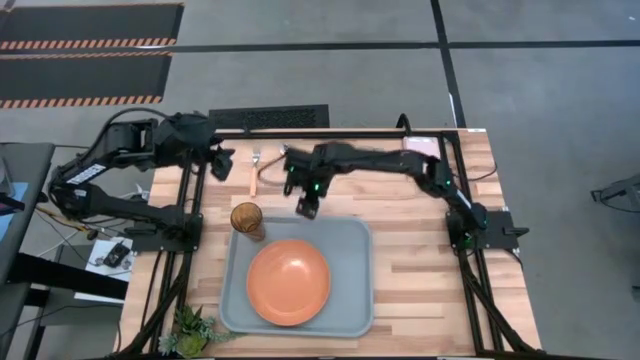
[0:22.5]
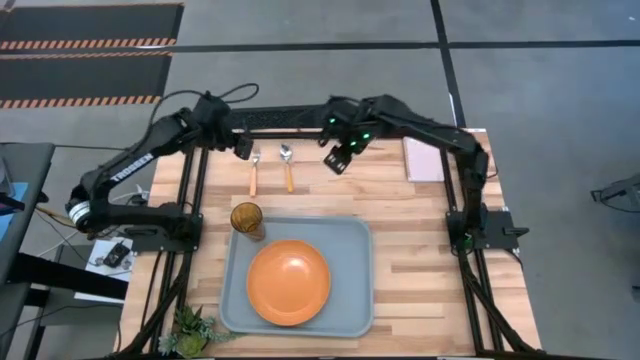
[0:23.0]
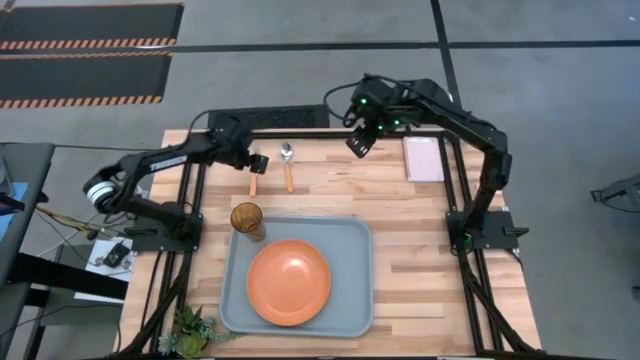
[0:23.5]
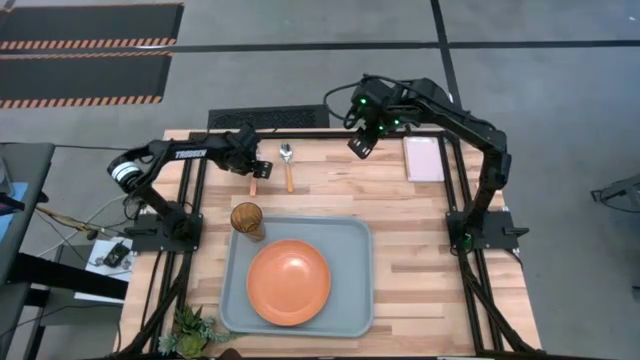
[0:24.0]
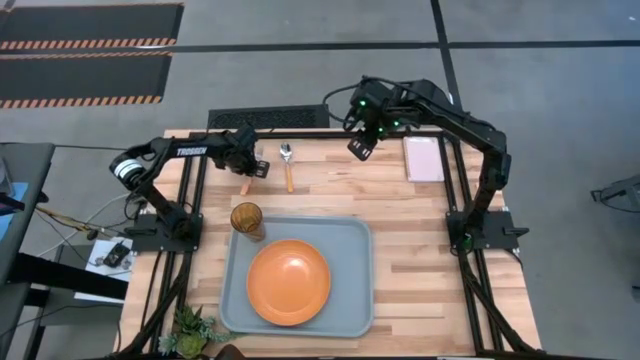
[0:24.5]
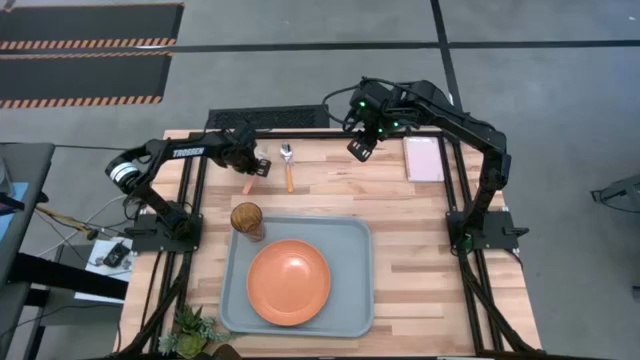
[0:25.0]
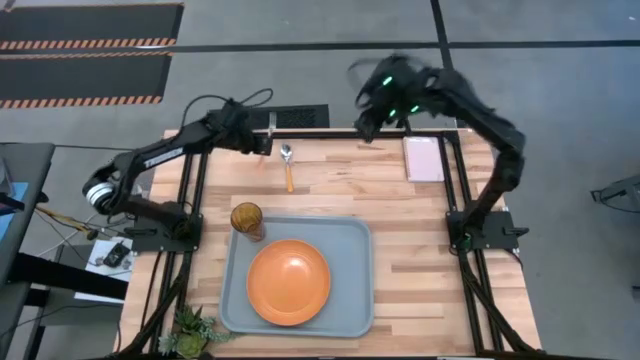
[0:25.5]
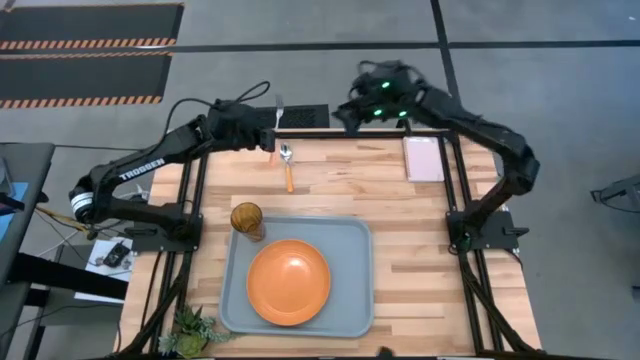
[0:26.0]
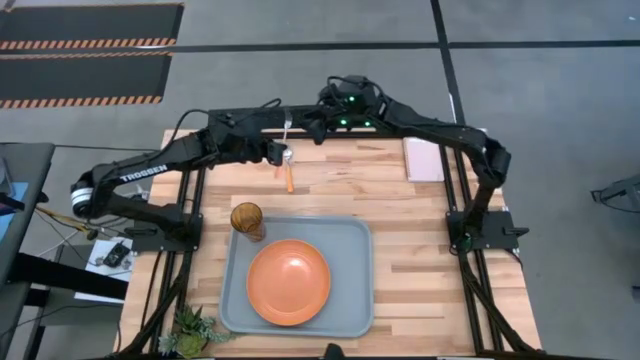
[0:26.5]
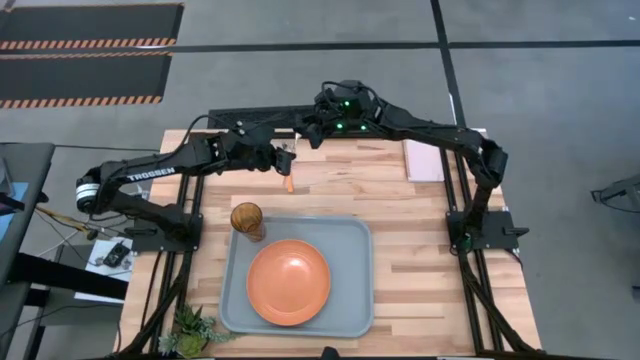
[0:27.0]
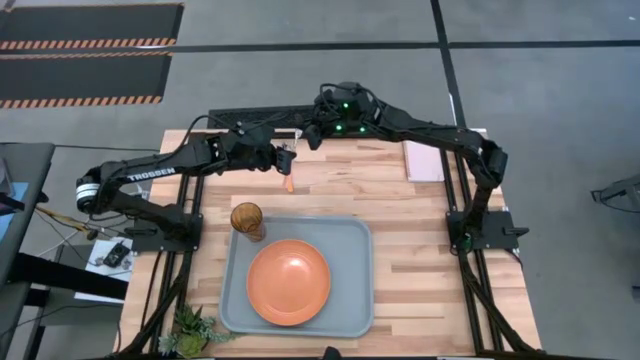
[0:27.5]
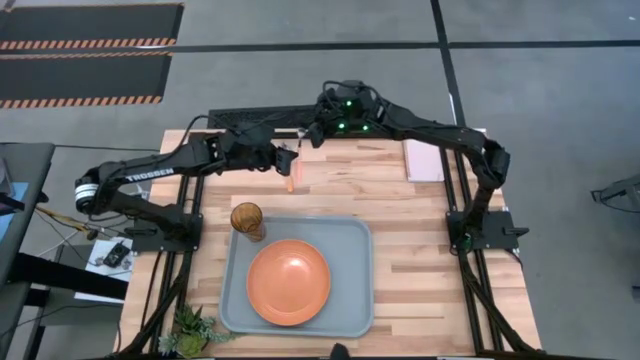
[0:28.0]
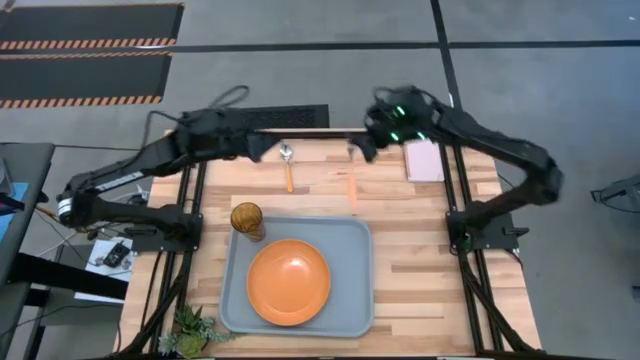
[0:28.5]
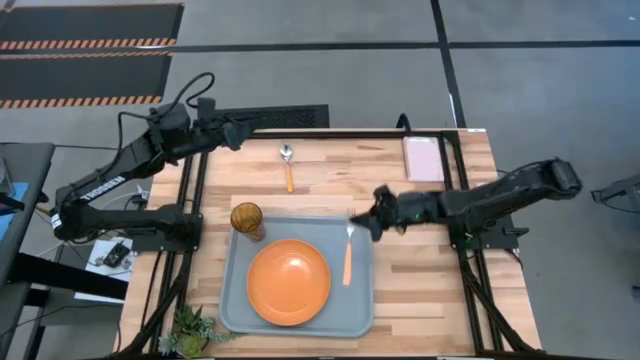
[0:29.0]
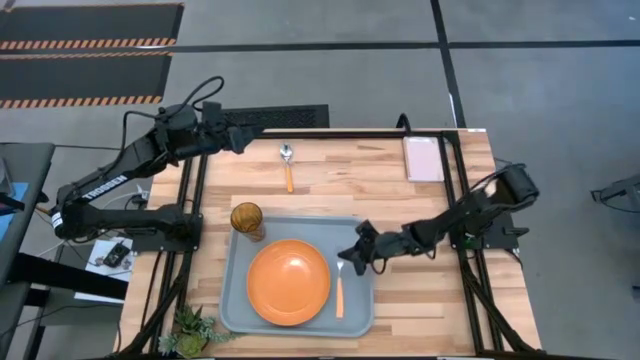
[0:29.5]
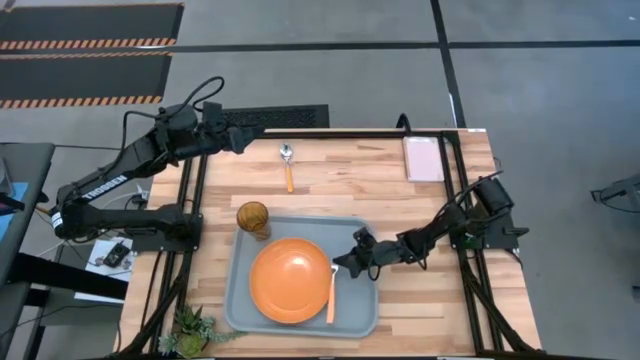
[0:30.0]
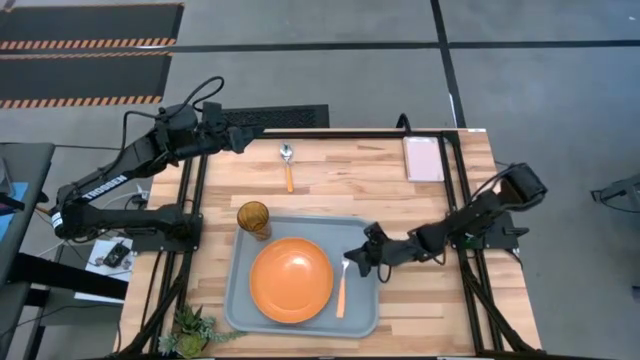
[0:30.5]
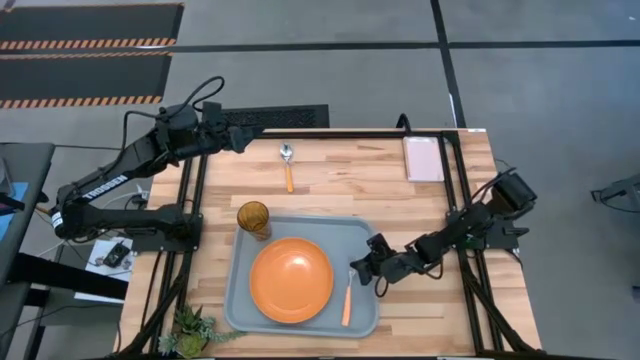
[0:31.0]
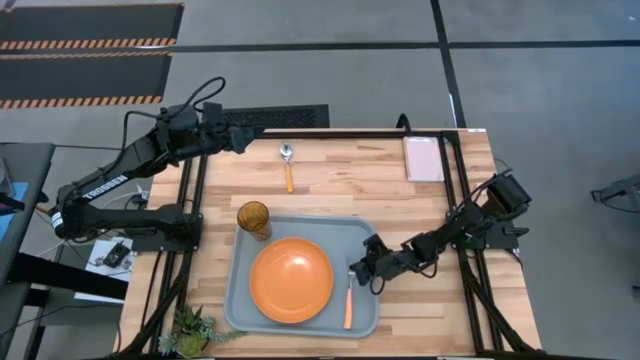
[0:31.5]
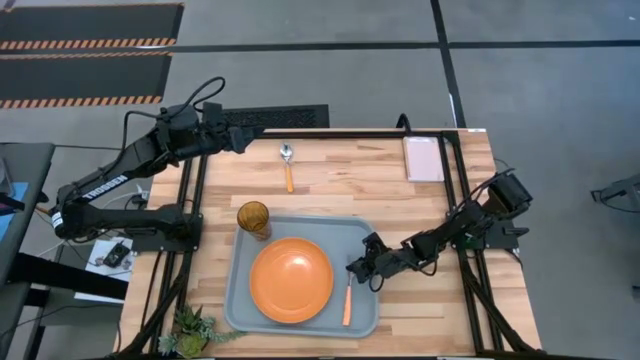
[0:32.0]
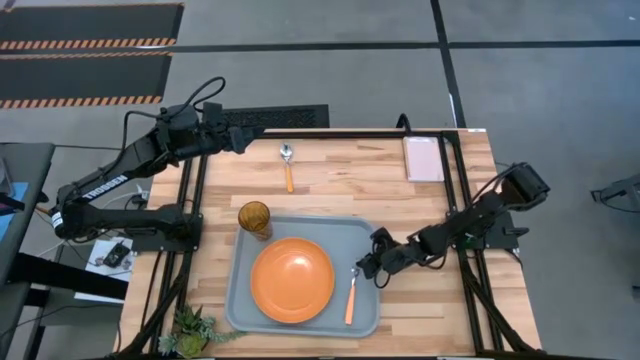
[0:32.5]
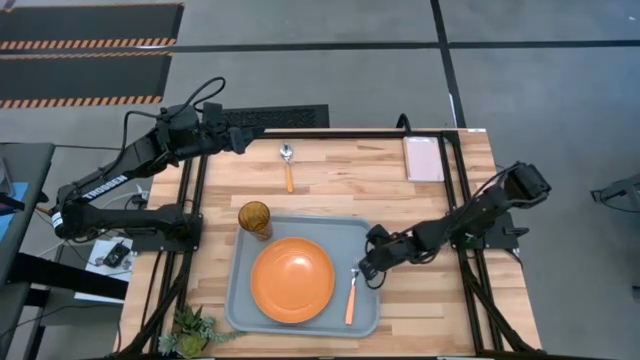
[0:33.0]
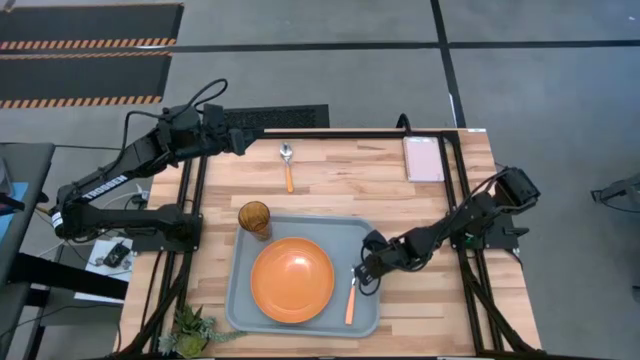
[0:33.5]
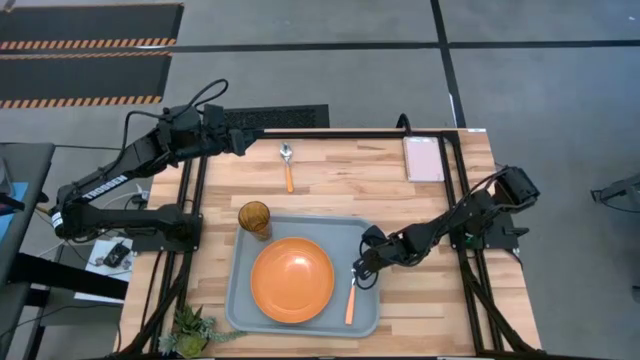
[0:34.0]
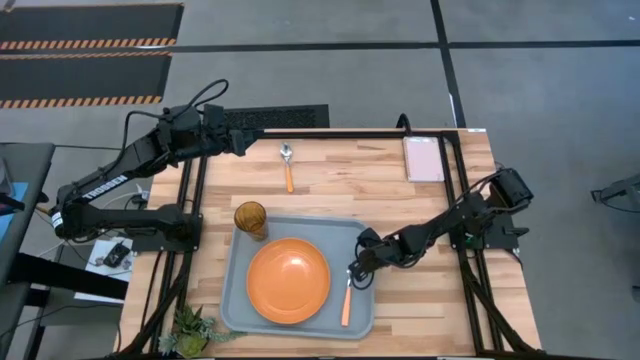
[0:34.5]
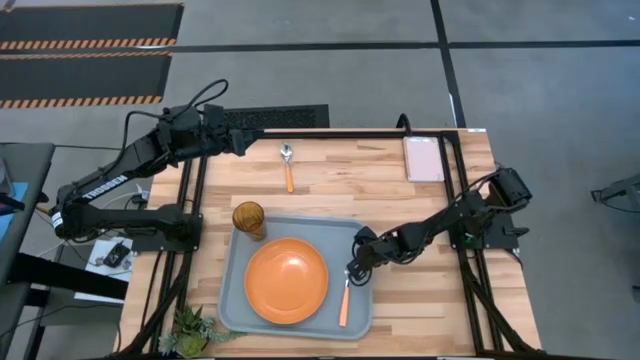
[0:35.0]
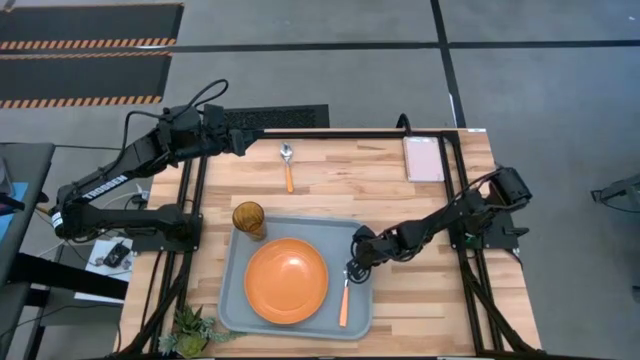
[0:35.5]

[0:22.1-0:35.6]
Task: Pick and place plate/cup/fork/spoon on tray
Put the light orange fork on the gray serving tray to the right of the orange plate

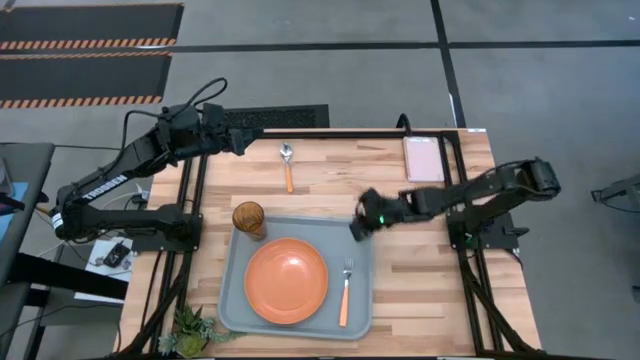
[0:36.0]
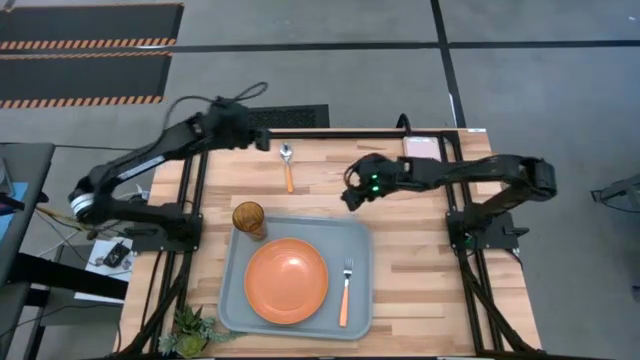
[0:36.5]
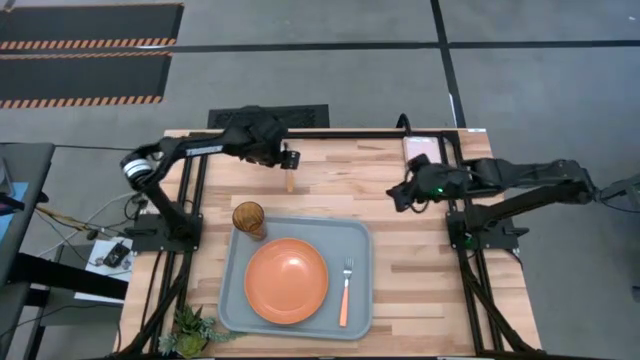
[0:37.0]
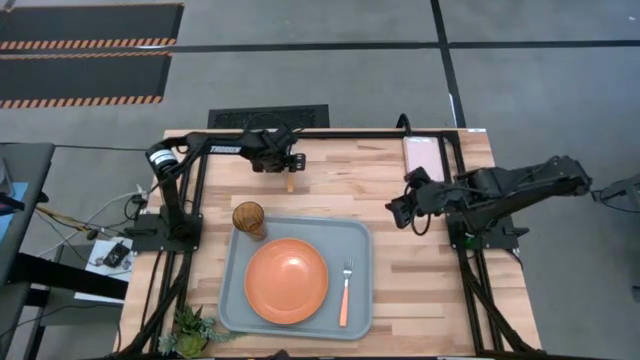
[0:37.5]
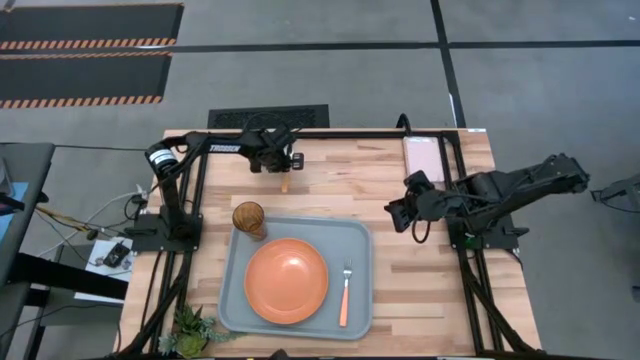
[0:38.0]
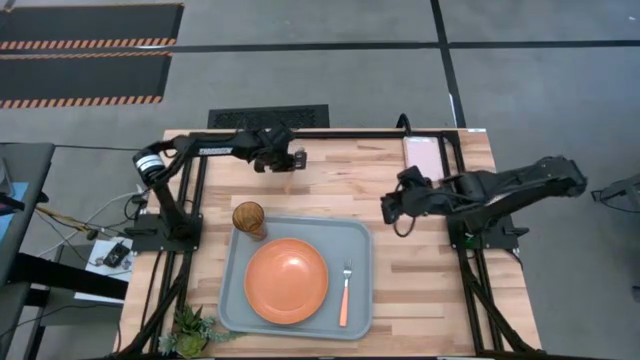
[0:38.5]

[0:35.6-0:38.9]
Put the yellow spoon on the gray serving tray to the right of the light orange fork

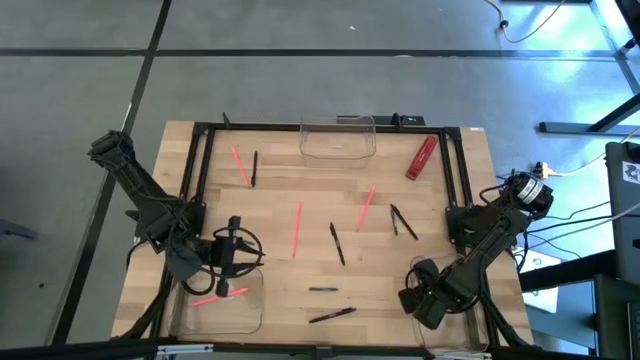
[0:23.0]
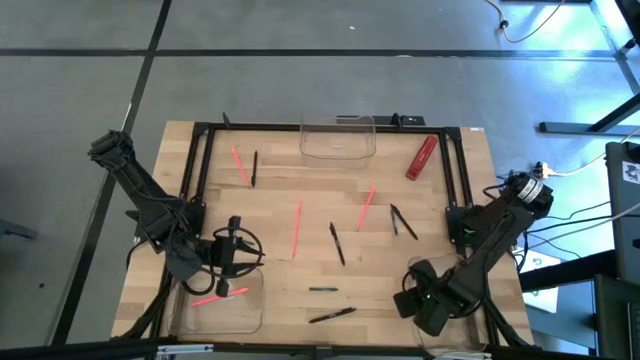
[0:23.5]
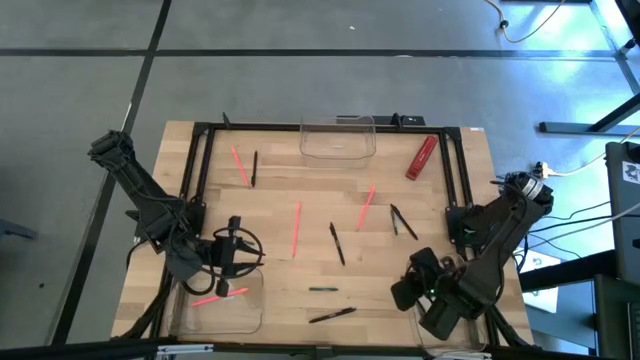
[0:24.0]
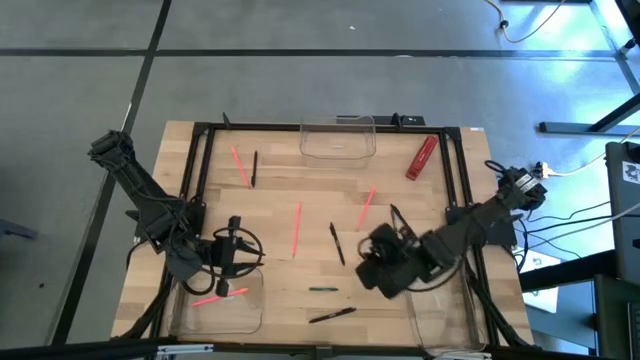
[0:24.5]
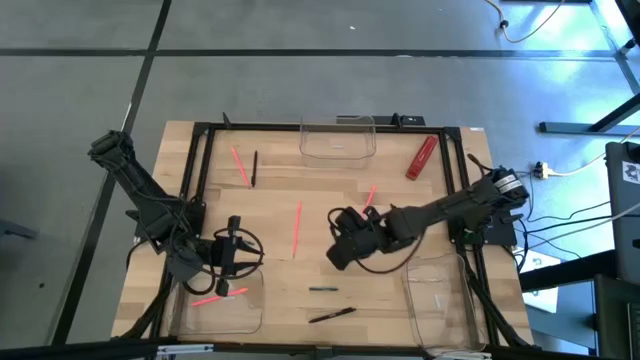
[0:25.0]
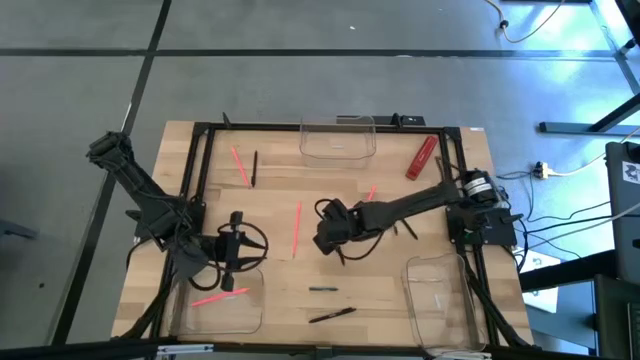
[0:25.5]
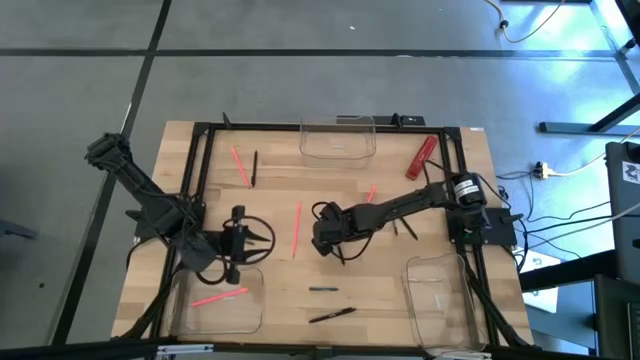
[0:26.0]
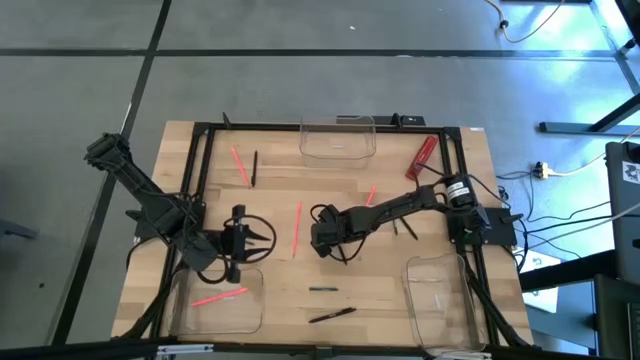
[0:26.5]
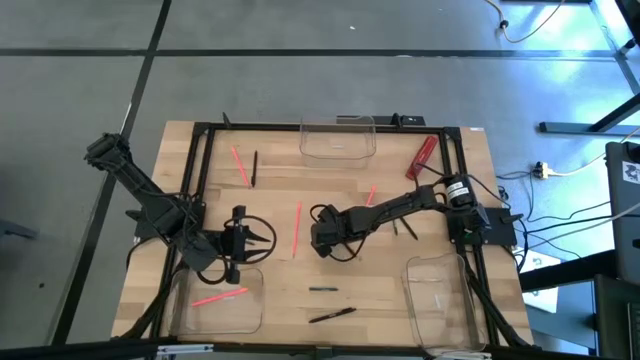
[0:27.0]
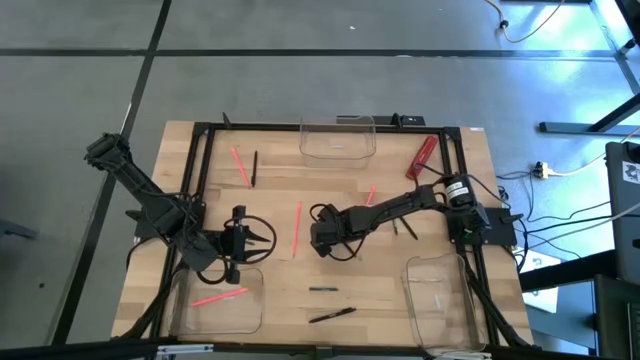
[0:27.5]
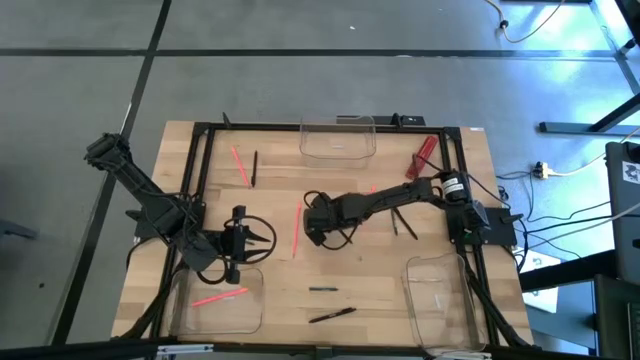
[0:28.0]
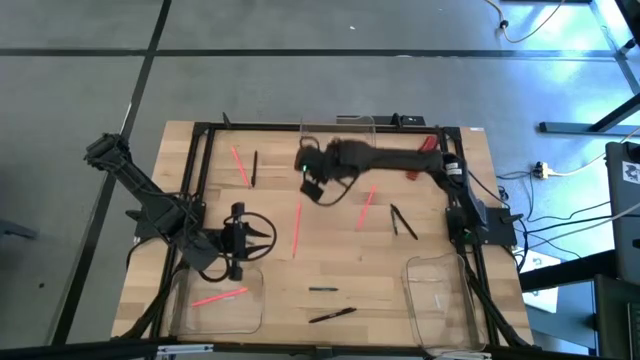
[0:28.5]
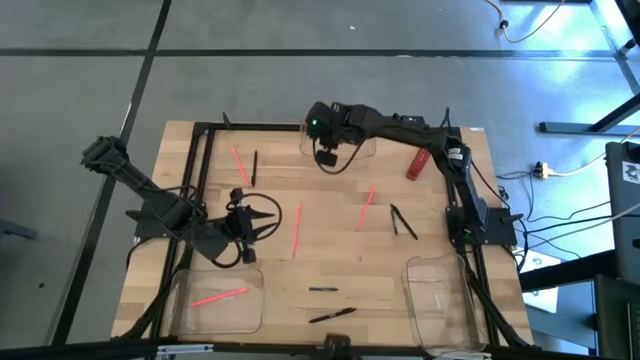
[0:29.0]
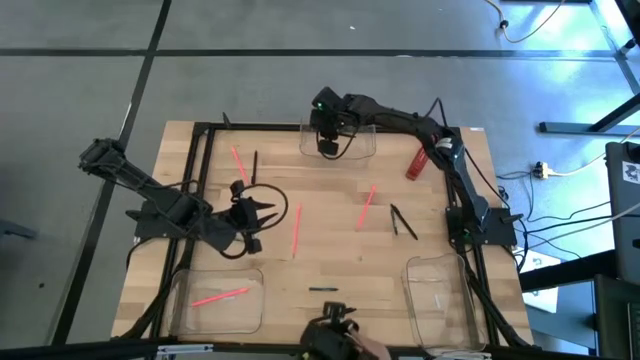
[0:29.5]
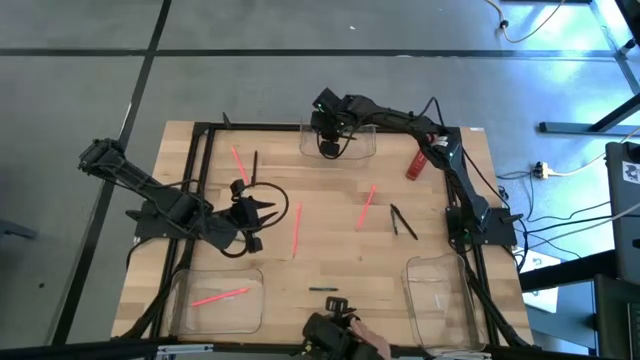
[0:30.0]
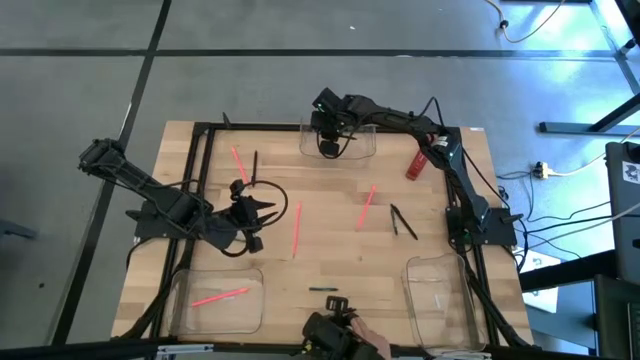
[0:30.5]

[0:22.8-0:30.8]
Task: Sort crayons/erasers/pens/pencils in bins
Put the black pen into the top transparent bin
